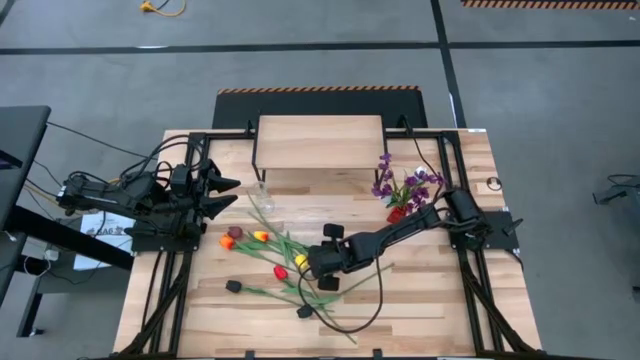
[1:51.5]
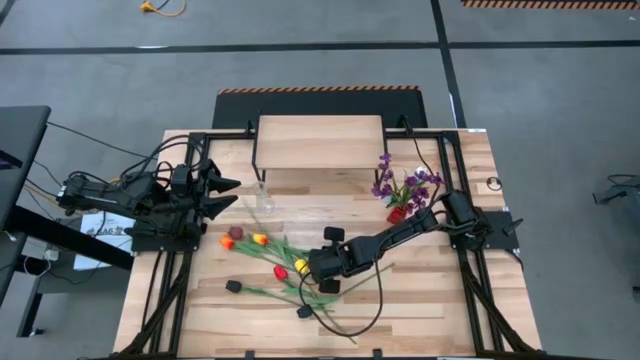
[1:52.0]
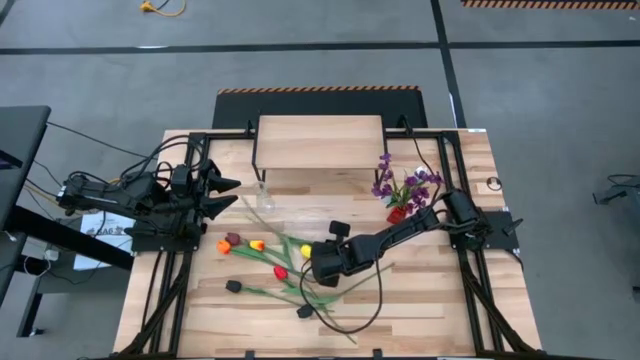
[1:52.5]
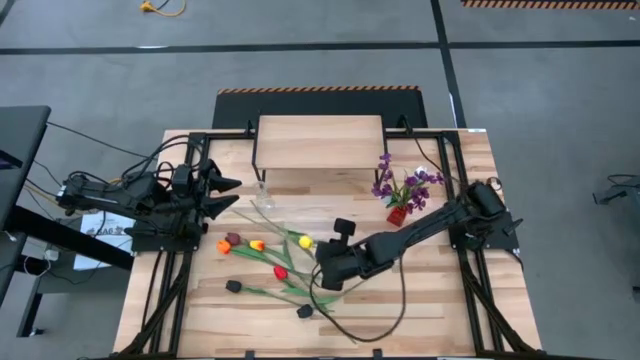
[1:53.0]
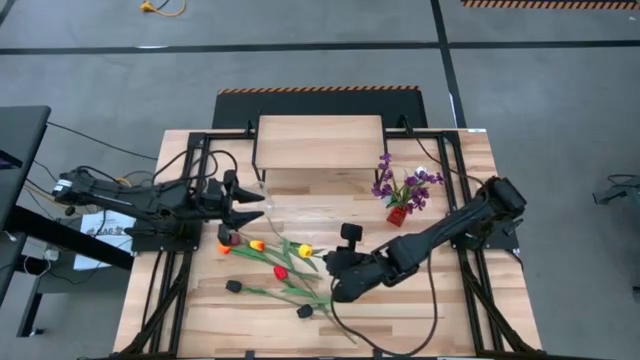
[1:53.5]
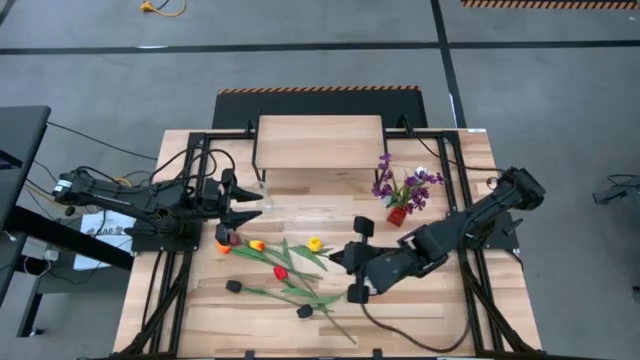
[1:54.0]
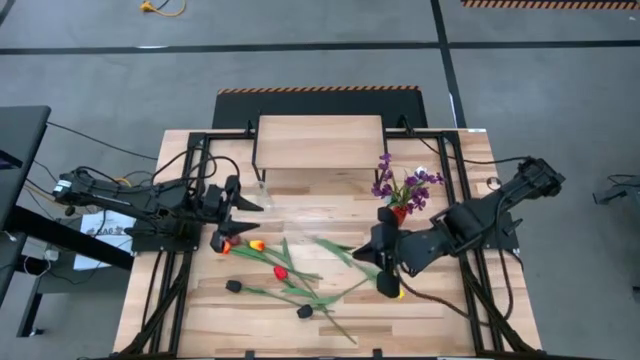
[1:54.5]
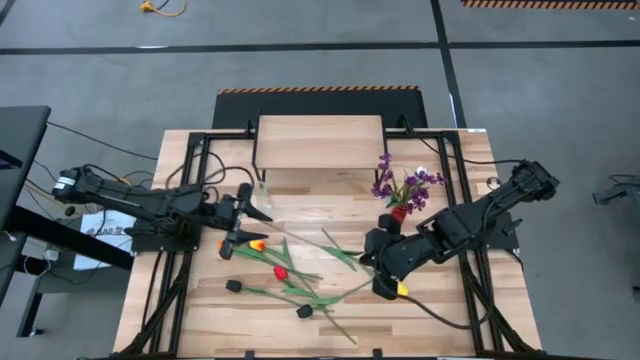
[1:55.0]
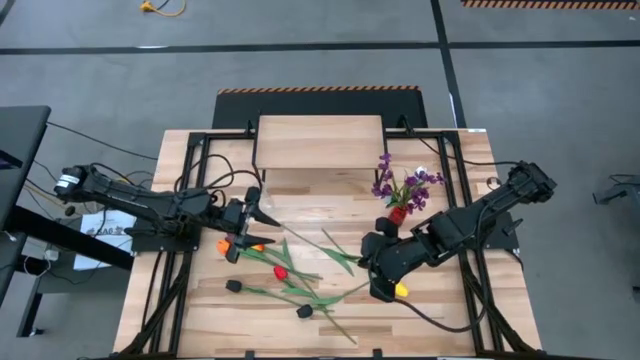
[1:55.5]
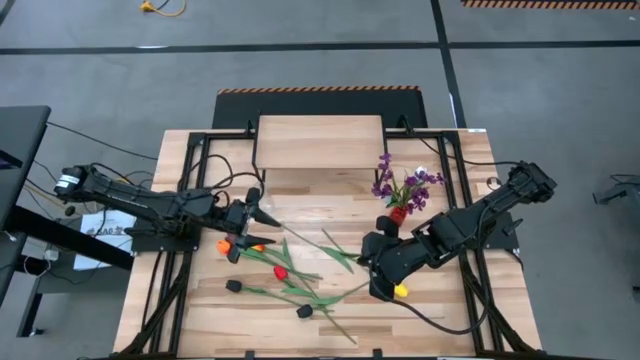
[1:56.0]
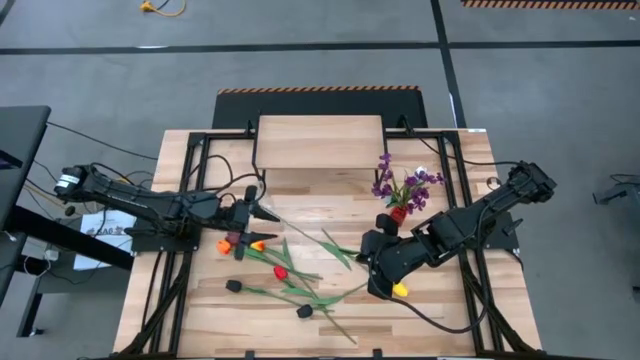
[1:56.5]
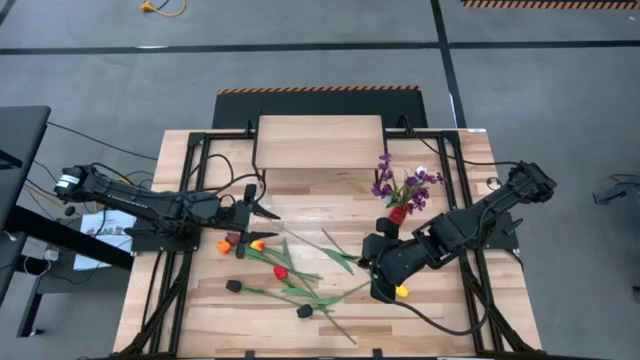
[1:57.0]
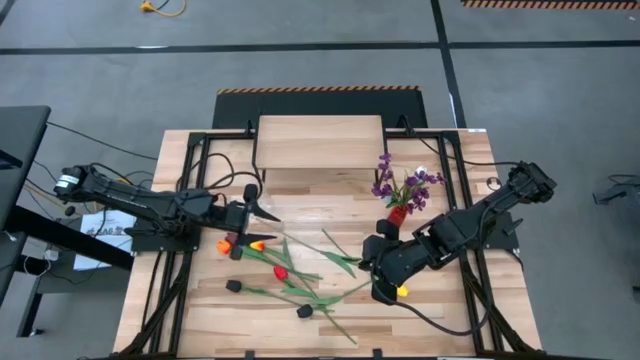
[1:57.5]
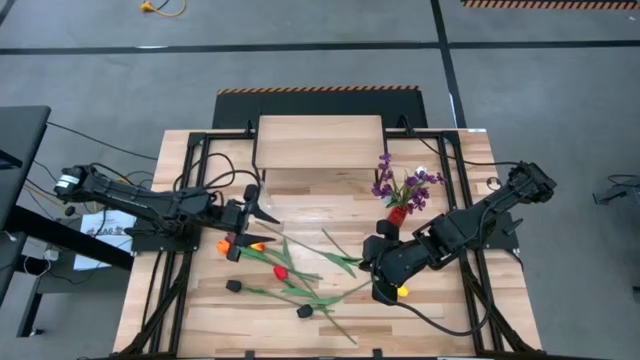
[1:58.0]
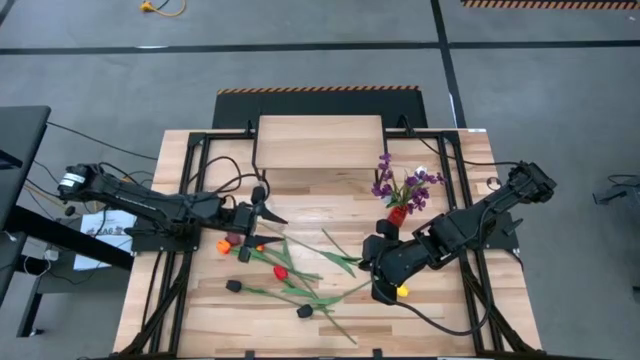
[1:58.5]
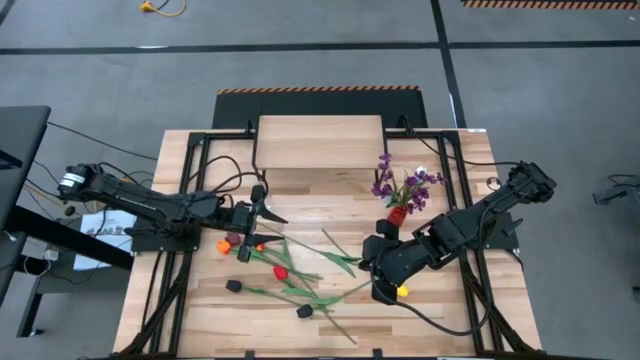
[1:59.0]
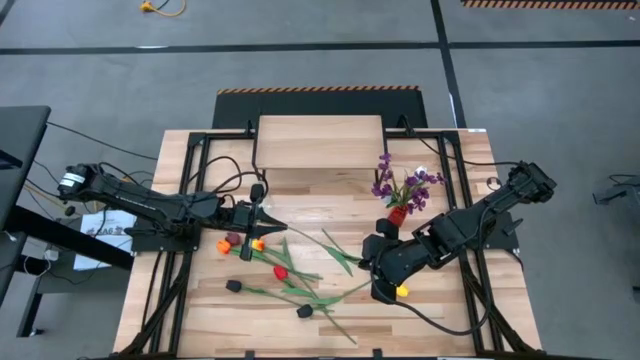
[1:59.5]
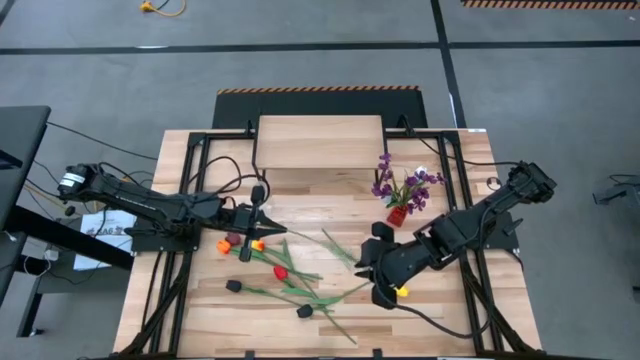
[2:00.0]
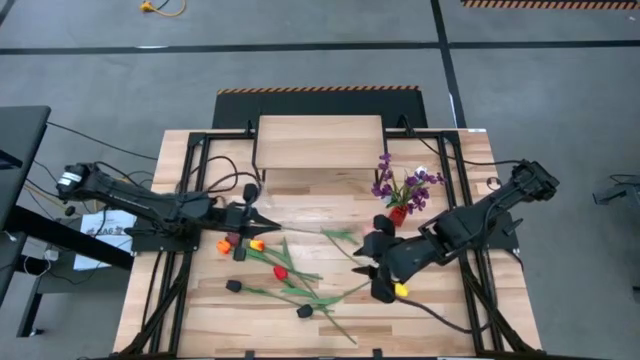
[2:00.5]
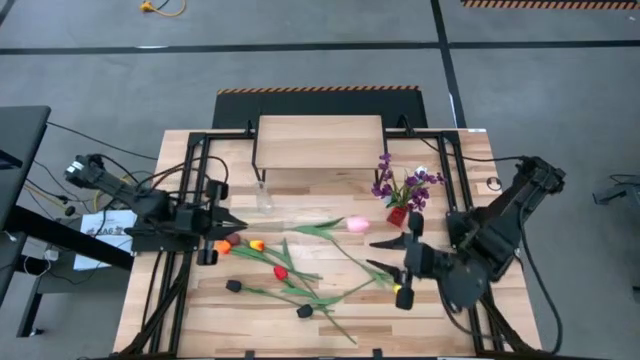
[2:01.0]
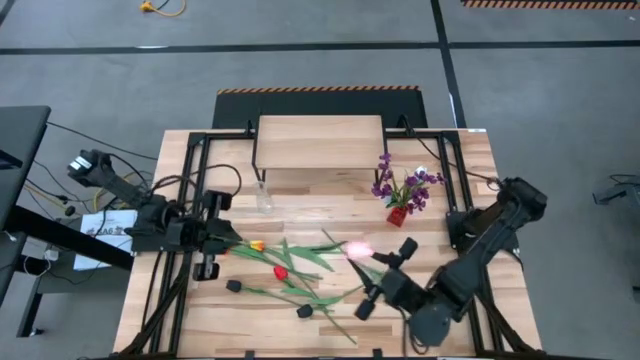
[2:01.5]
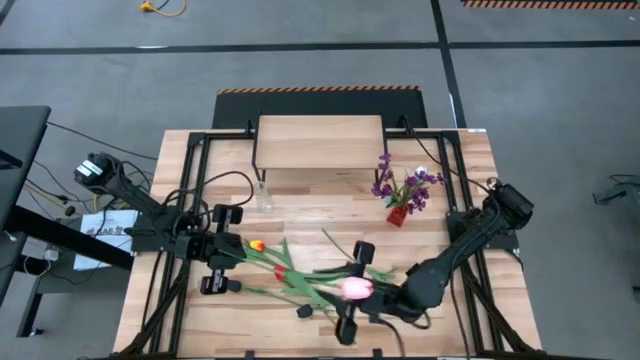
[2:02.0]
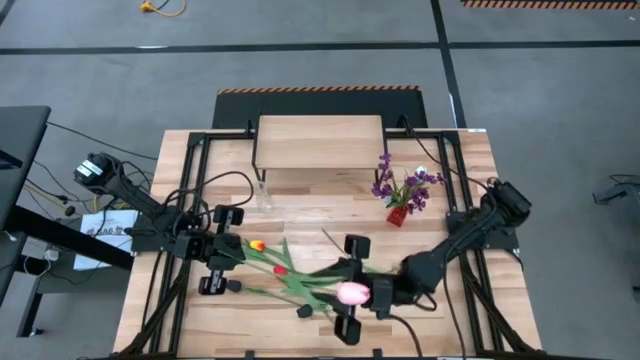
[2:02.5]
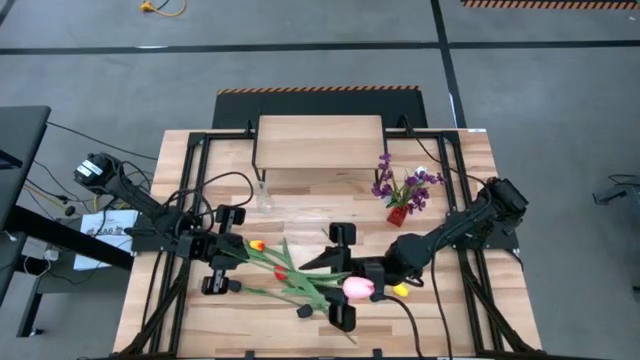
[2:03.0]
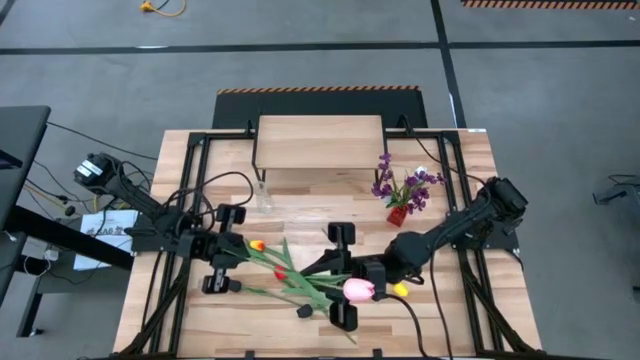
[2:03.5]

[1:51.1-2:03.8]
Task: Pick and place flowers into a vace then onto a shelf
Put the pink flower into the red vase

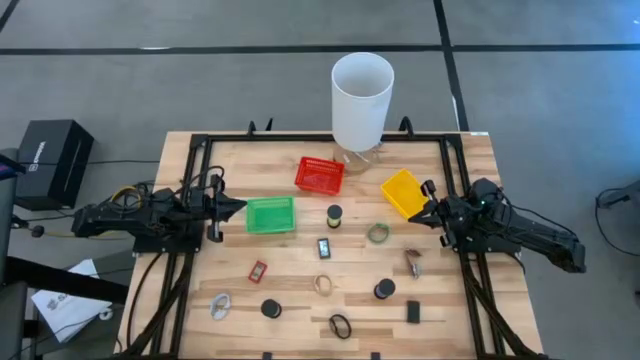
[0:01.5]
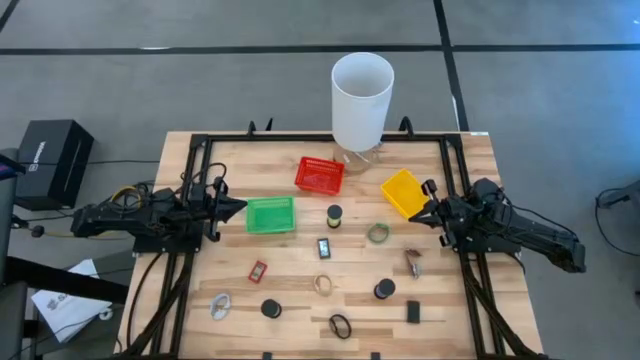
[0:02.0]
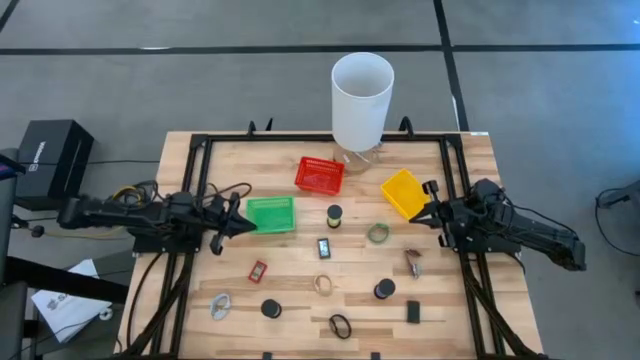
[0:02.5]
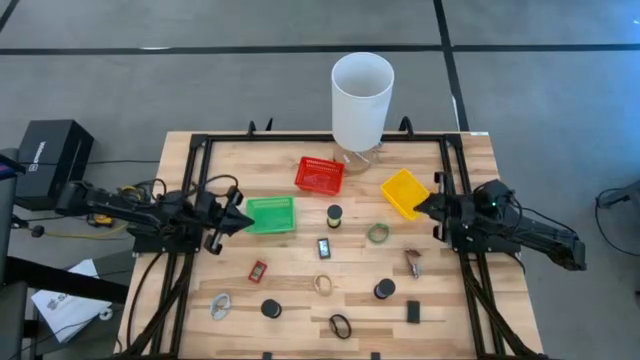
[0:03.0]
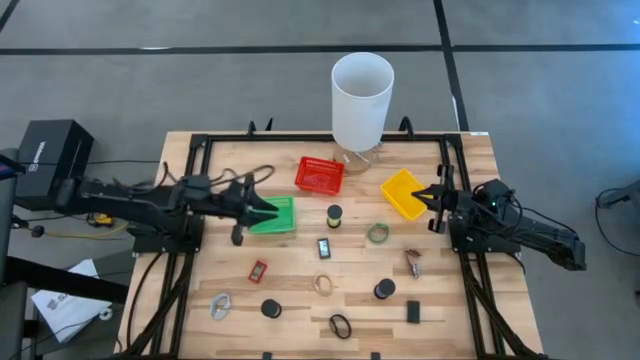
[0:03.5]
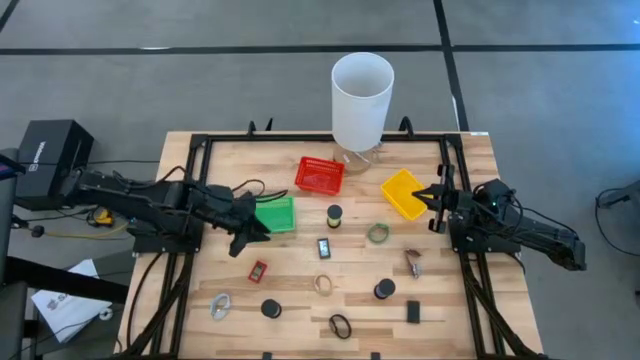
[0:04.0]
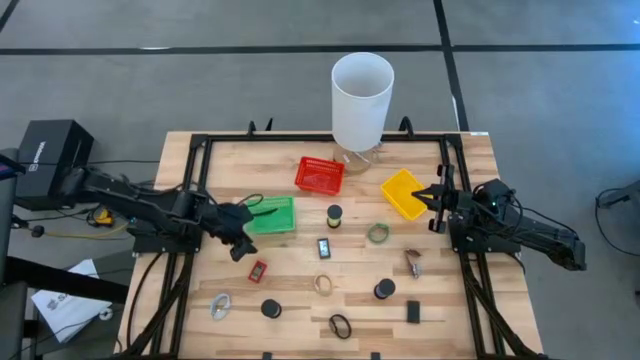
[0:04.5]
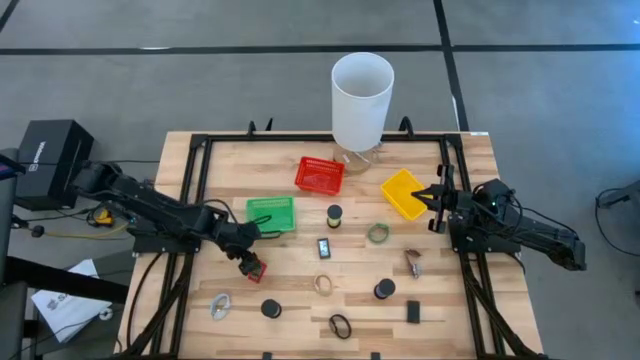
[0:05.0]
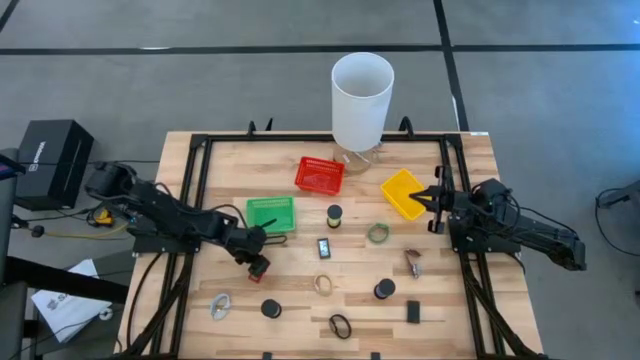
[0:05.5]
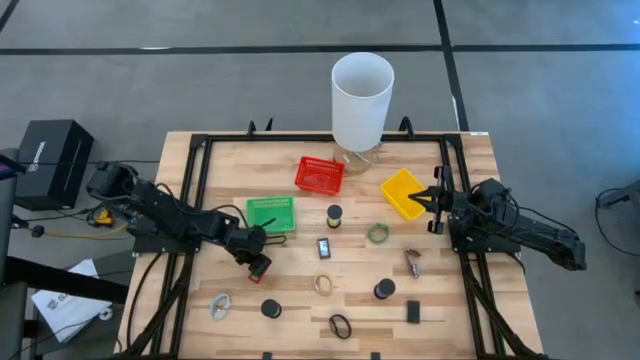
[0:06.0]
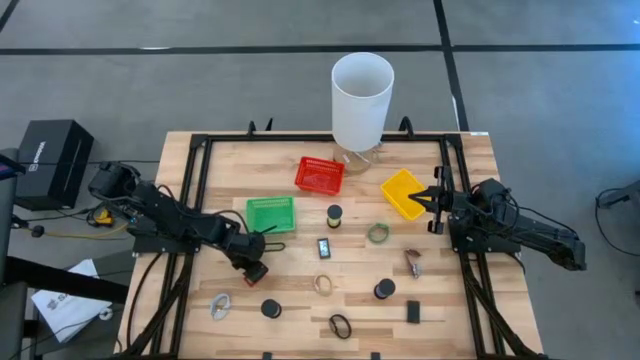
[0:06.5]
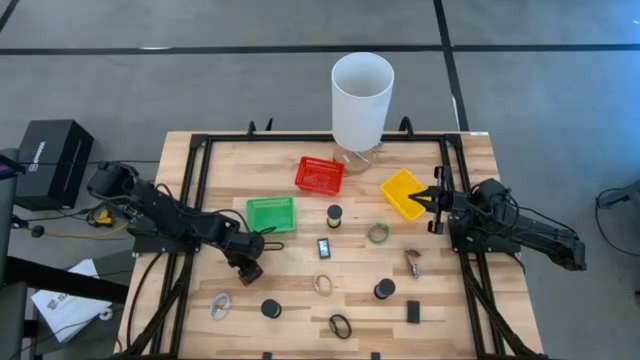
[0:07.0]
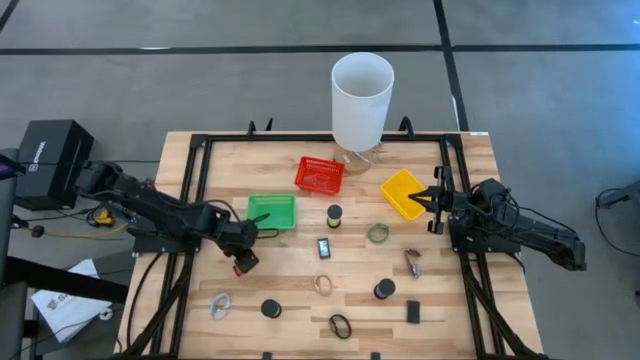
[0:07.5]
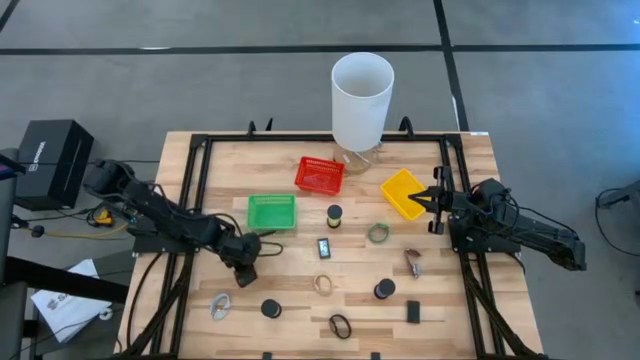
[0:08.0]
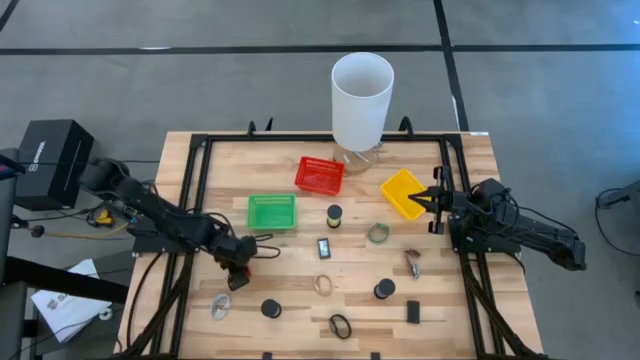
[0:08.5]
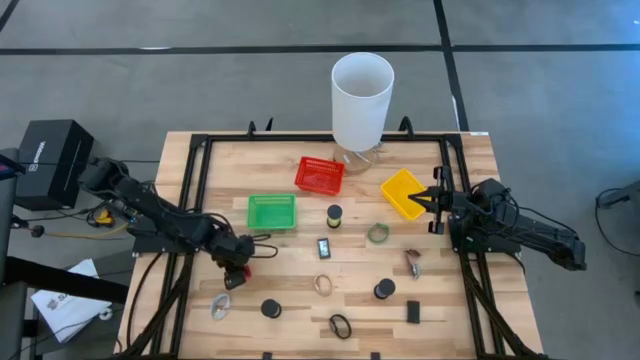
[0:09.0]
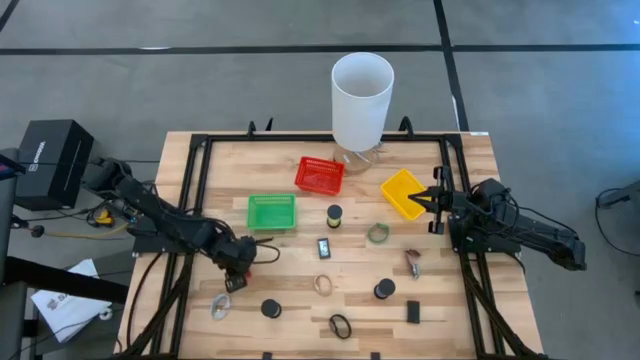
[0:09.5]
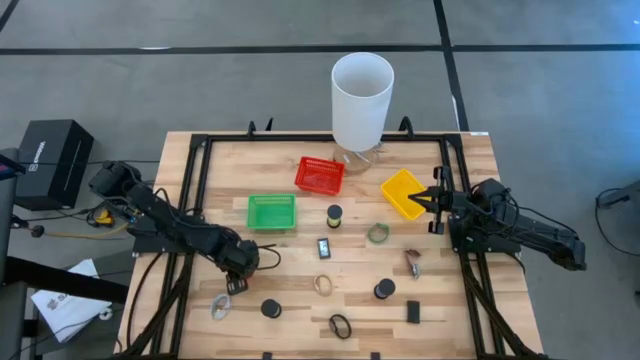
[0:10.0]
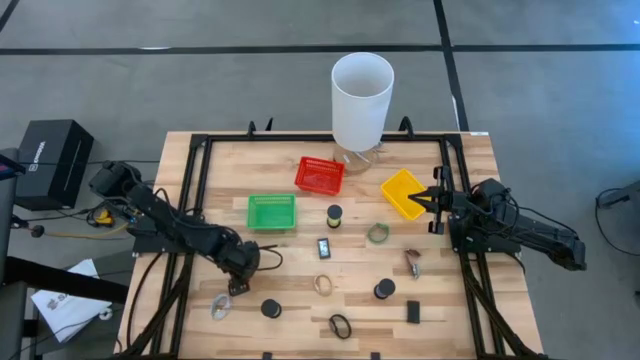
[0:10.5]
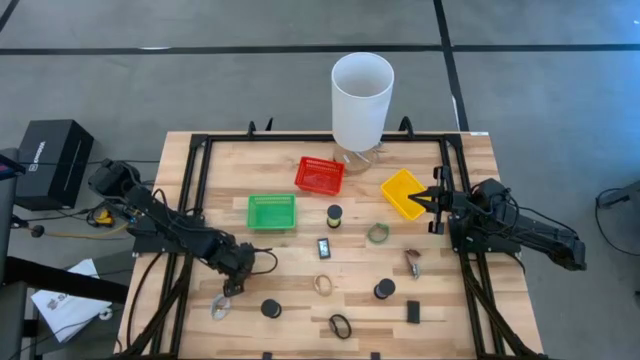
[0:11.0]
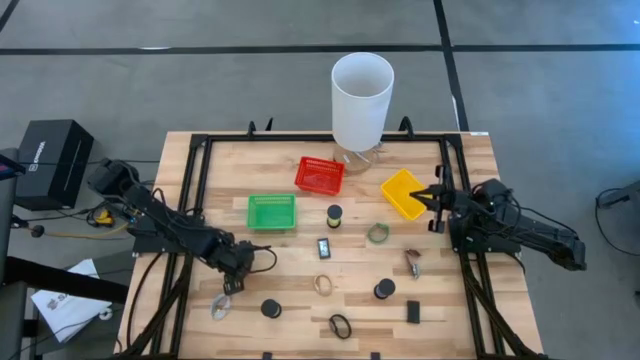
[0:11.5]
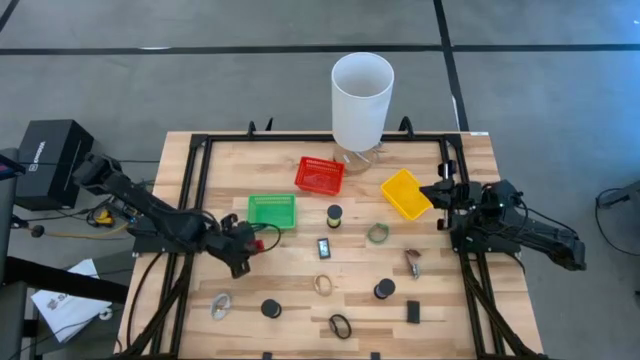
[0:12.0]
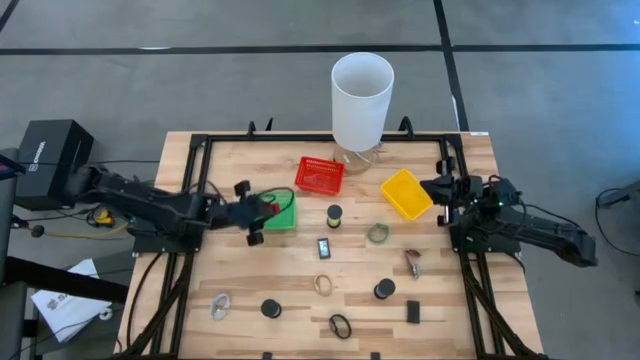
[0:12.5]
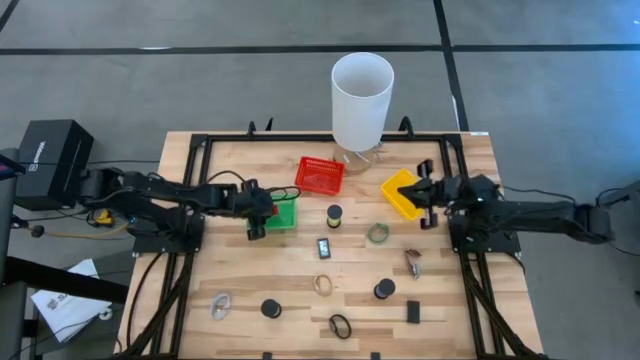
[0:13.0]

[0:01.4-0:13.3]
Task: Pick & Place Office items
Put the red digital timer into the green bin
